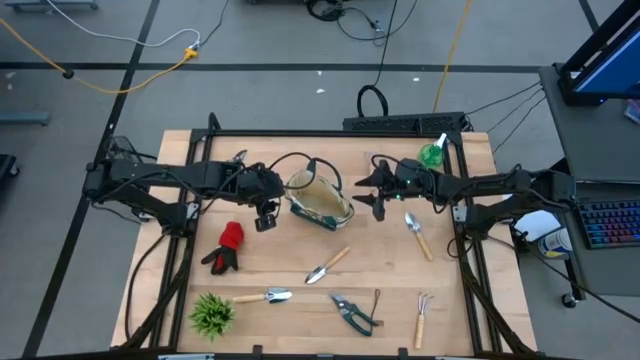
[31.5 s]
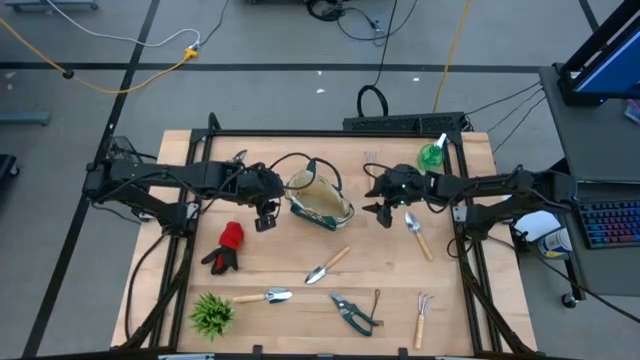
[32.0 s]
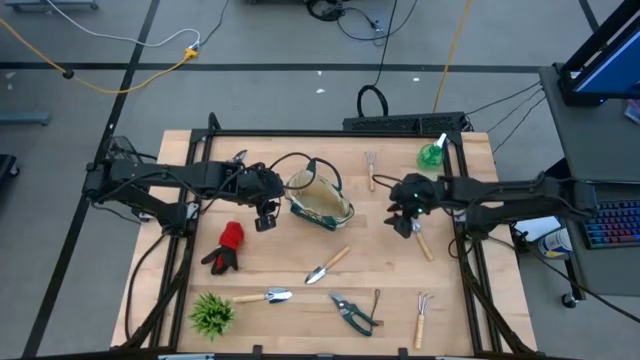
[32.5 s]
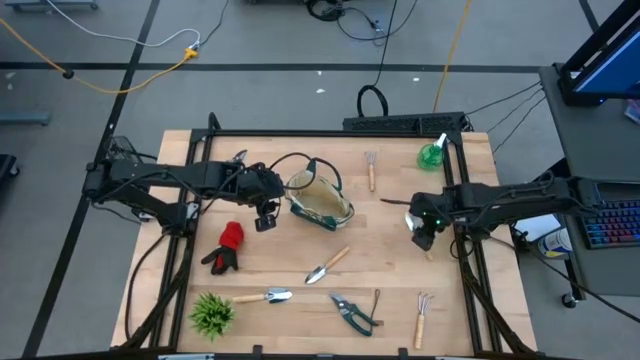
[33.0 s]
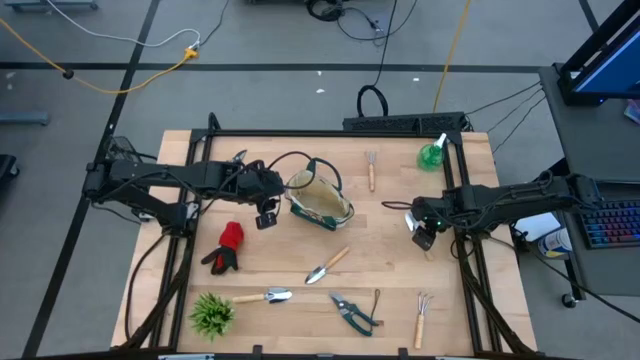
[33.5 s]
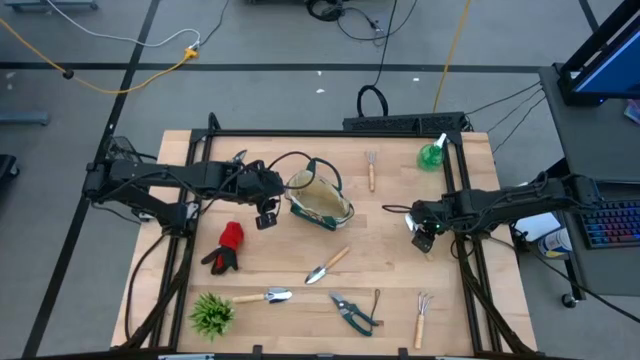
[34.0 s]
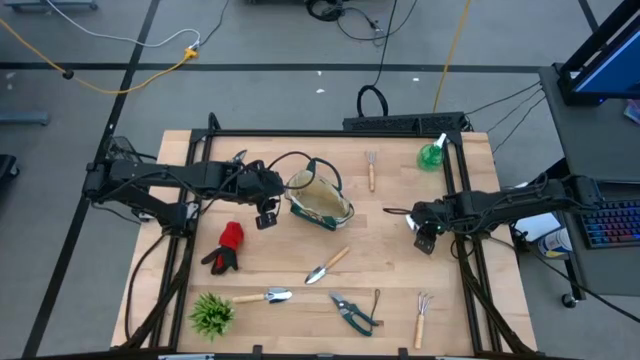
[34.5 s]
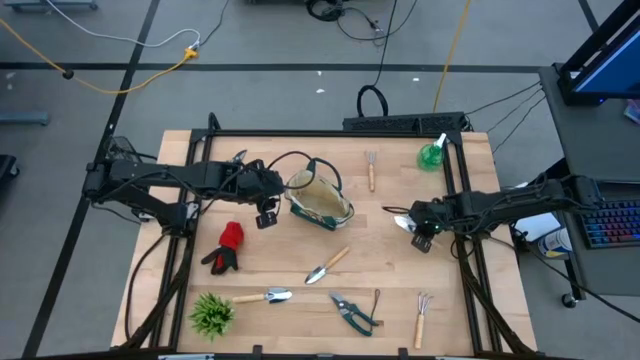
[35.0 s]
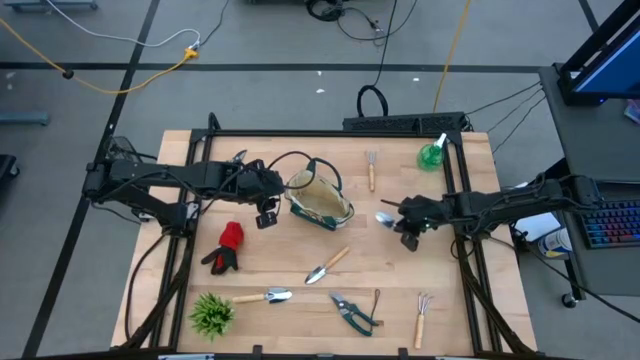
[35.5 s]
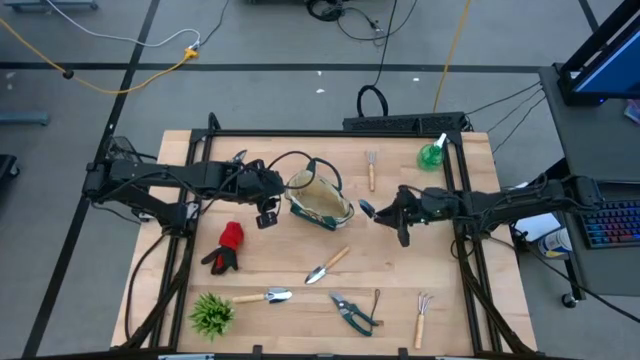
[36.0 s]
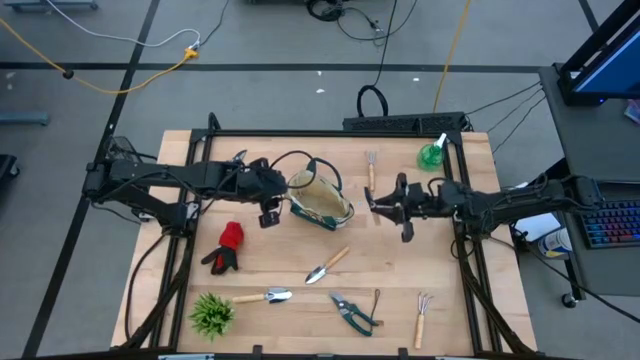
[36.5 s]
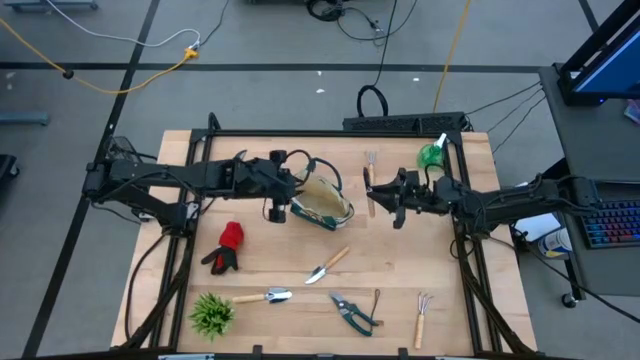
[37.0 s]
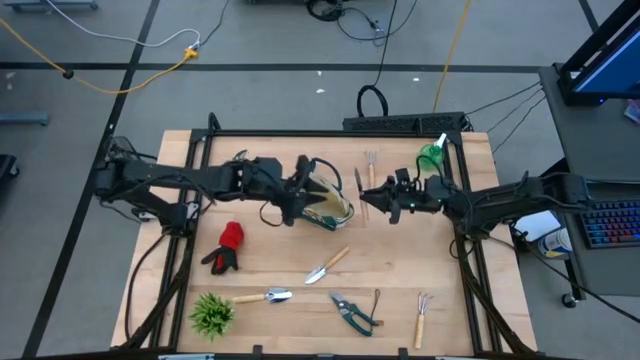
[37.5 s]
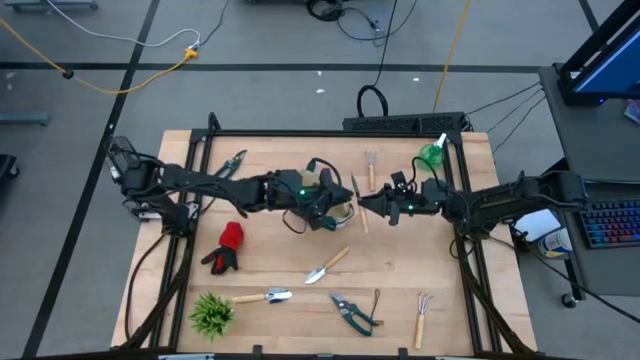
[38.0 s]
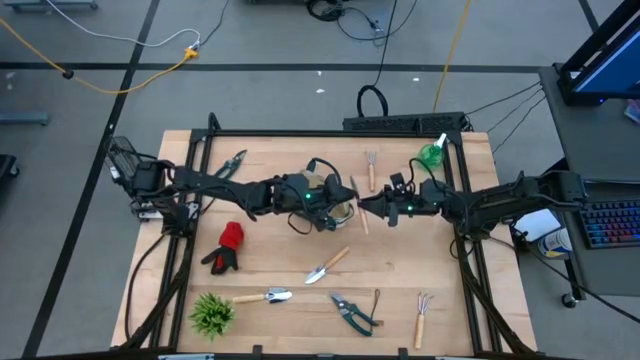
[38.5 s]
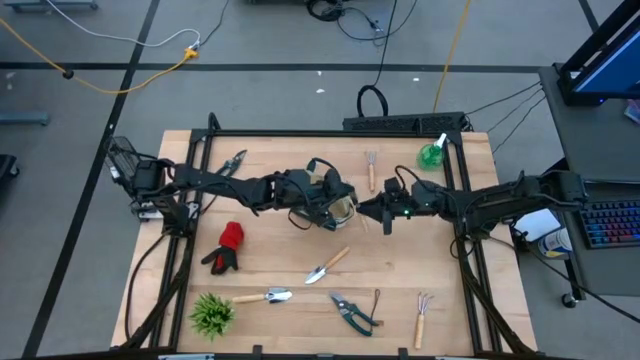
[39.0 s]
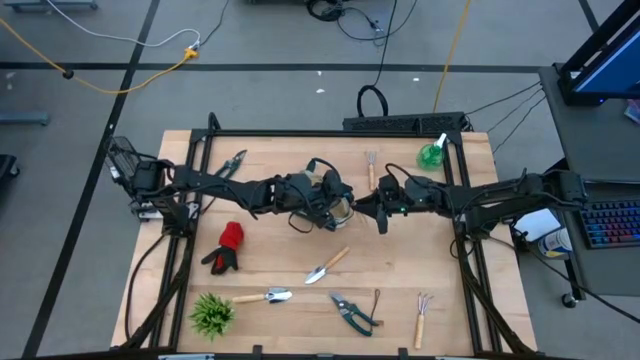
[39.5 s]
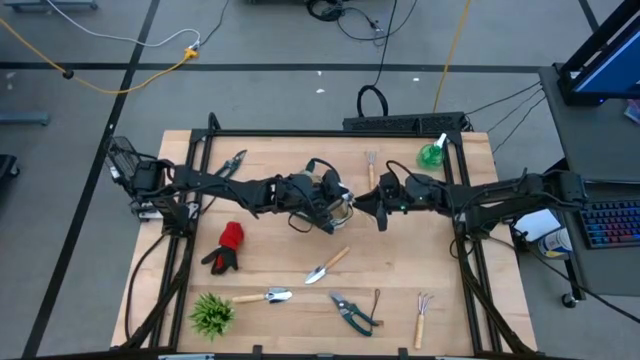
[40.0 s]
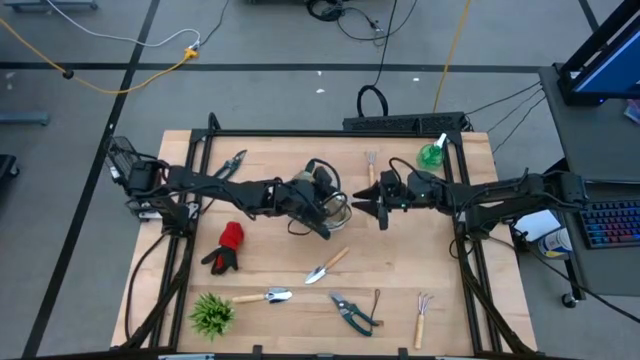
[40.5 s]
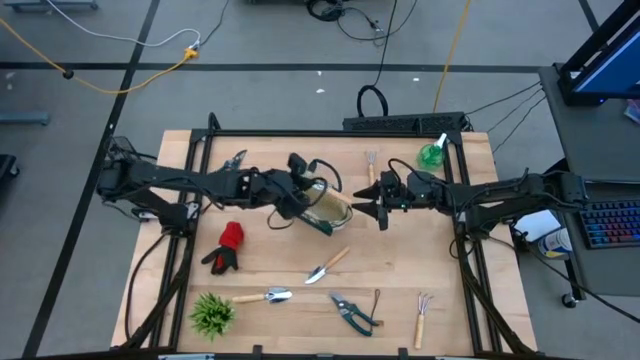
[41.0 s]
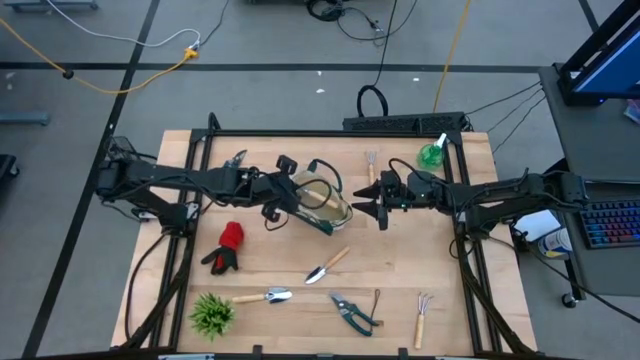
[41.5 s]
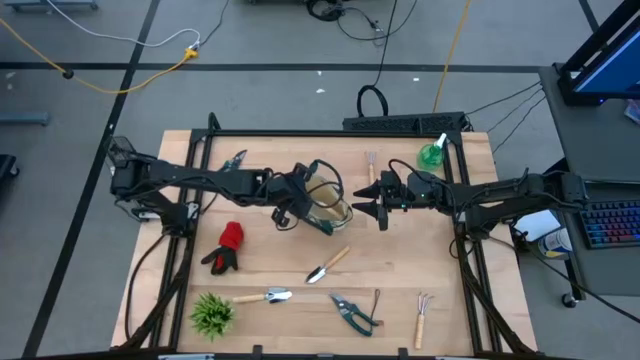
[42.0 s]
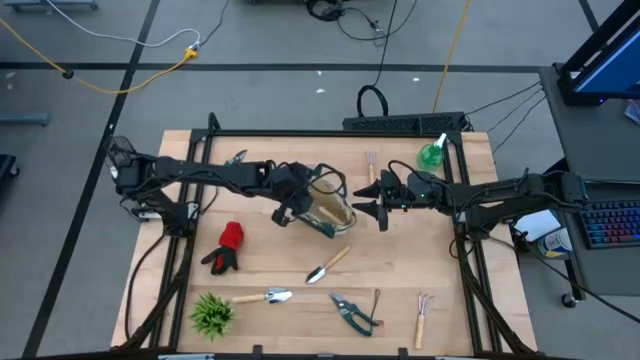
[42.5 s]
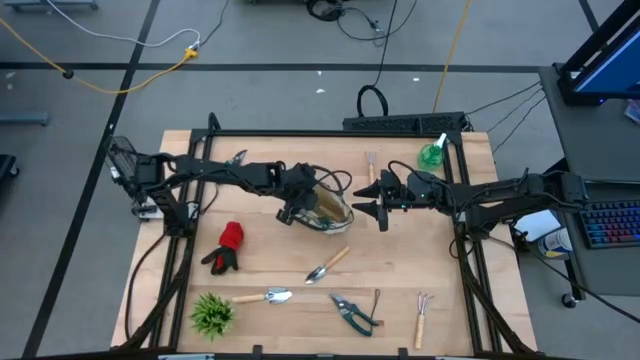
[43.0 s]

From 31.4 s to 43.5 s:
Task: Pick & Place Garden tools in Gardening bag
Put the top brown trowel into the gardening bag

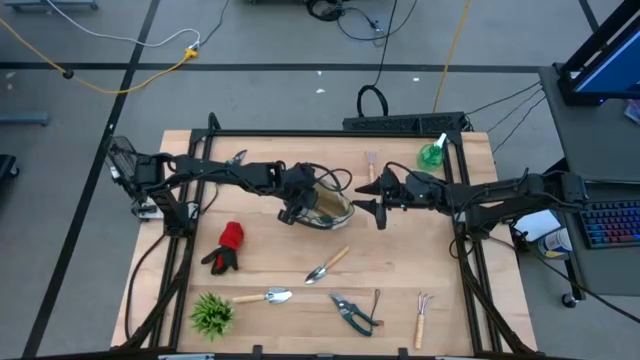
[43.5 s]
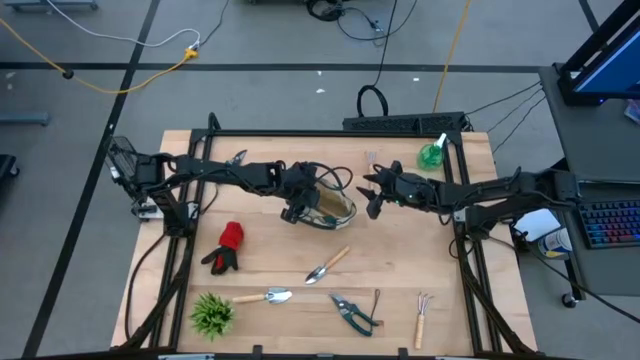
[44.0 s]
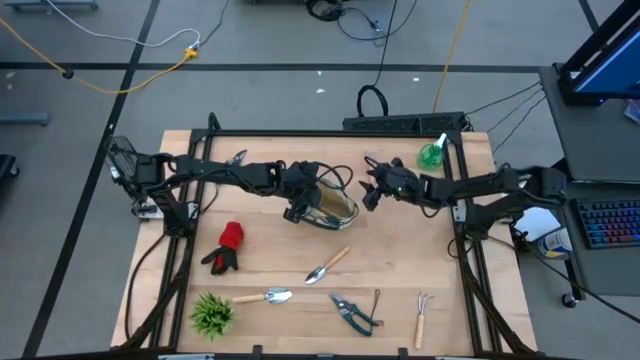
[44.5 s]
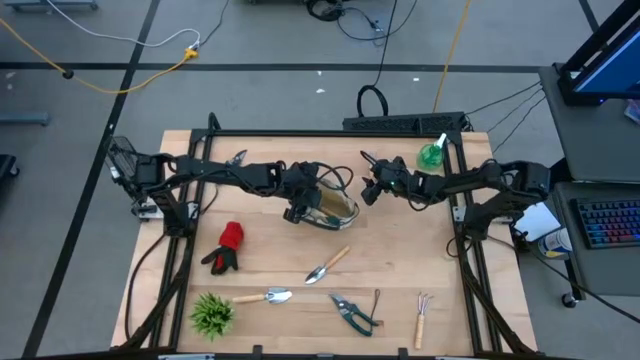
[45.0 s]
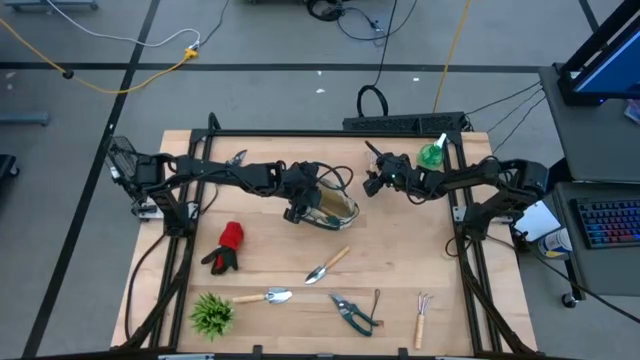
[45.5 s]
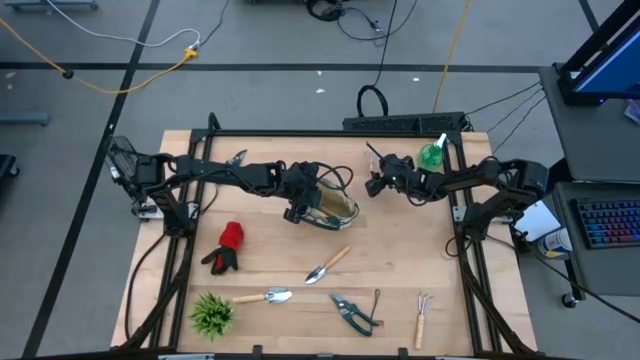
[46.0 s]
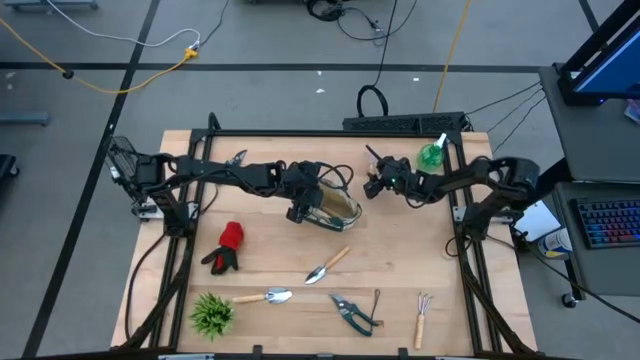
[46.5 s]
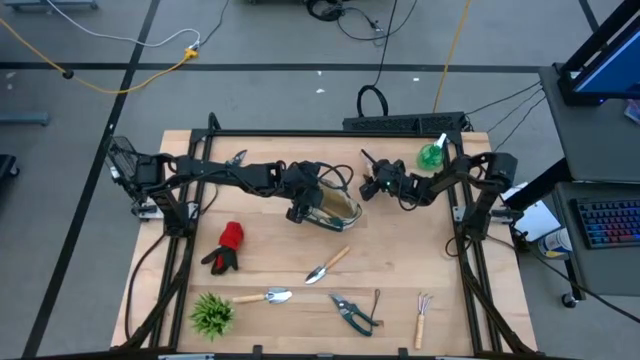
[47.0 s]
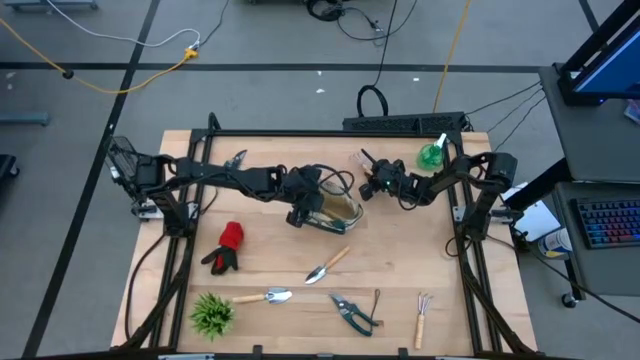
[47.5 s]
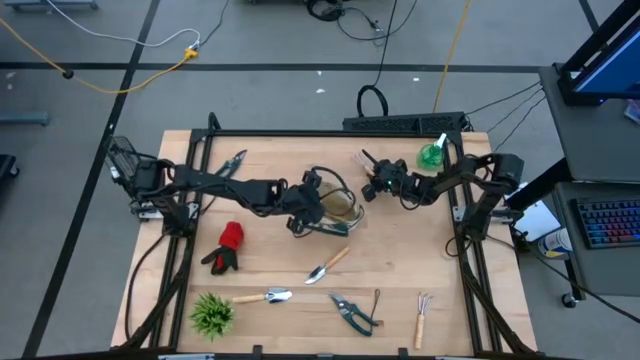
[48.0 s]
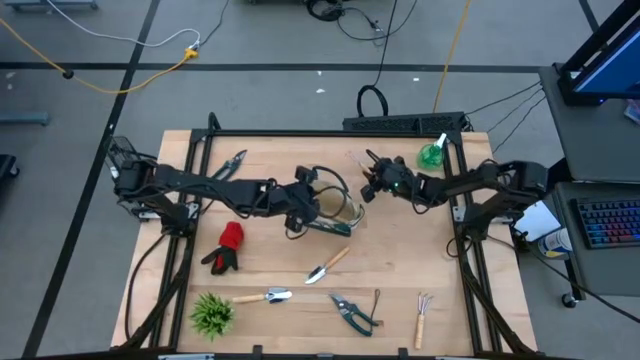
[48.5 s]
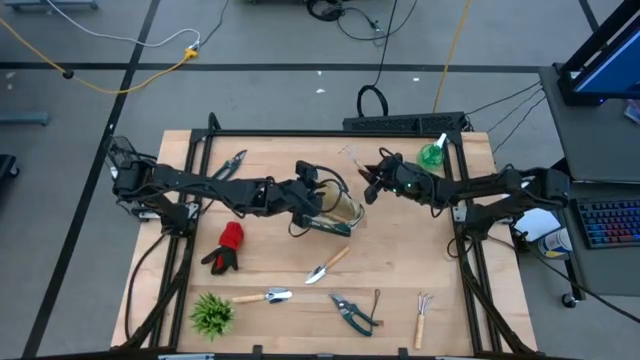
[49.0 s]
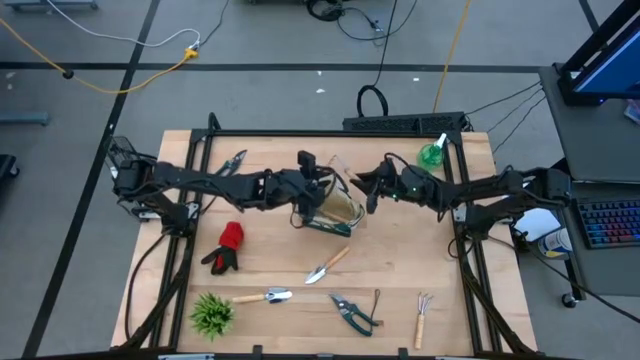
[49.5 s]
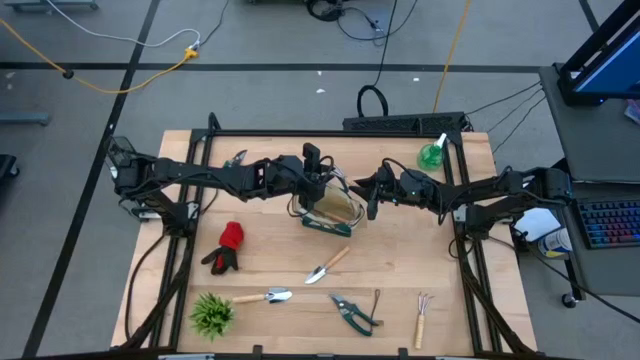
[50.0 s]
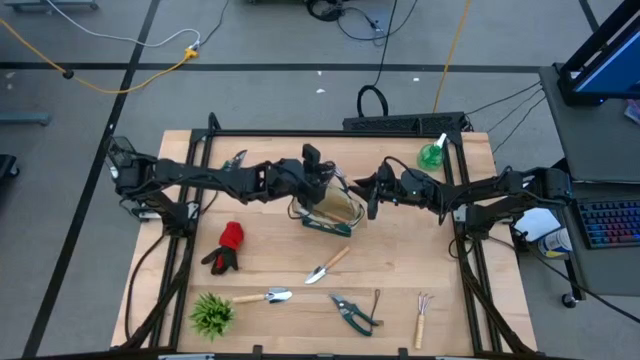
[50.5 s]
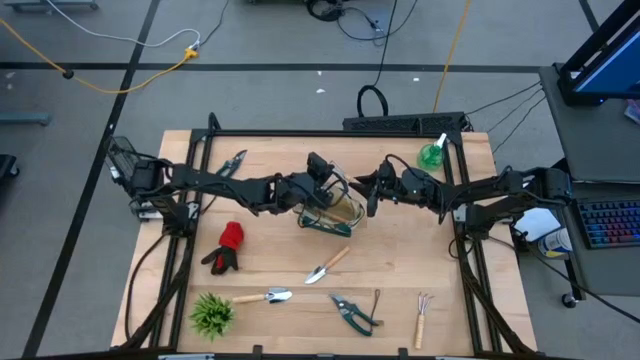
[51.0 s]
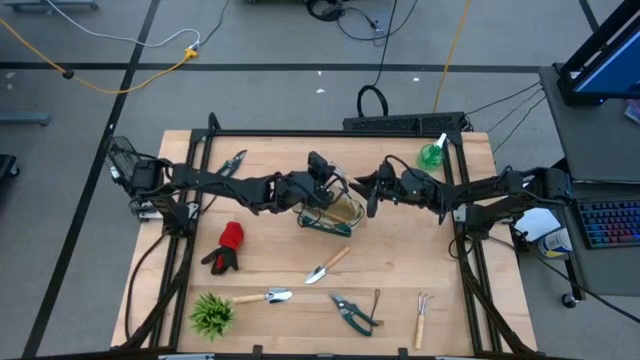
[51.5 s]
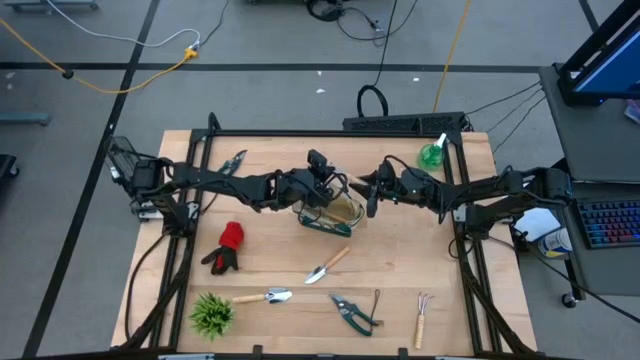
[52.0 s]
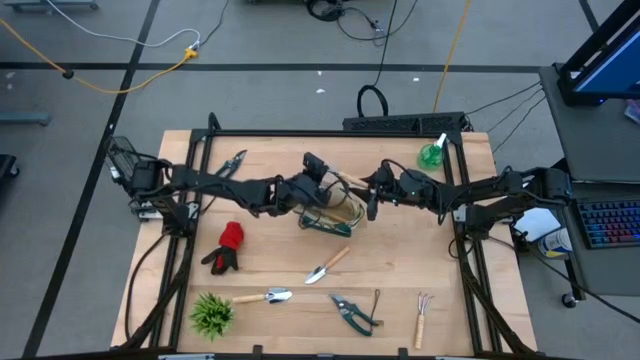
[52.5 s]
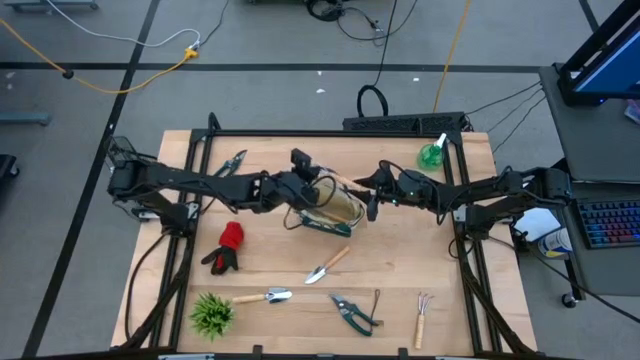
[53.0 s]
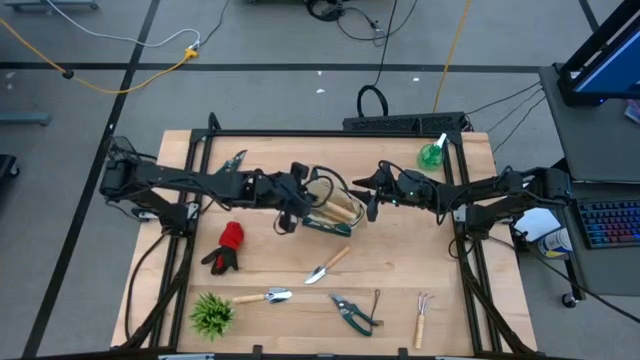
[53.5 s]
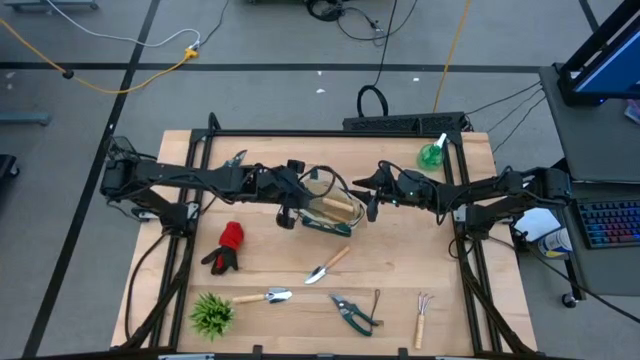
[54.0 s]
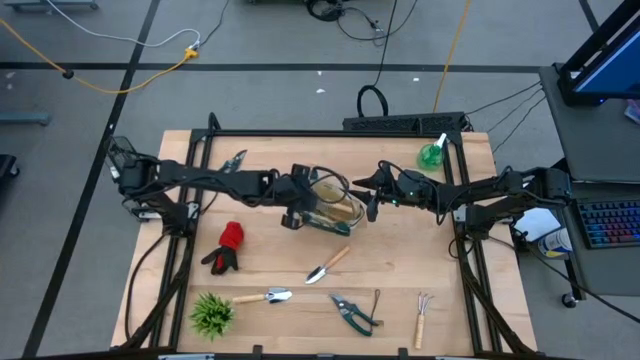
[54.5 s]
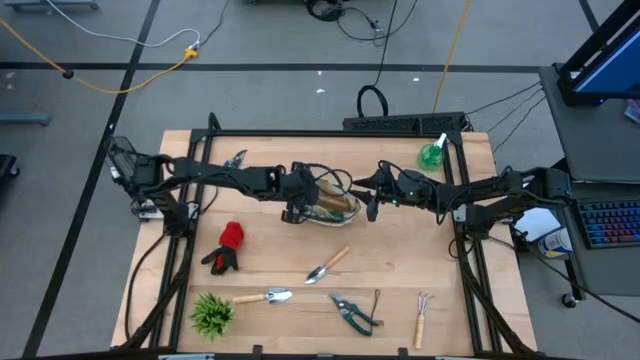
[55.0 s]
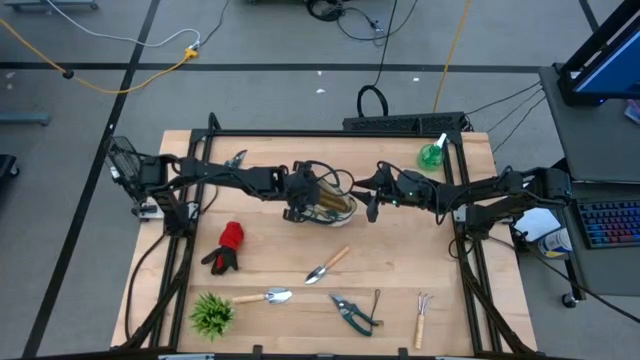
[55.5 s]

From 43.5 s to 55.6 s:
Put the top brown hand rake into the gardening bag
